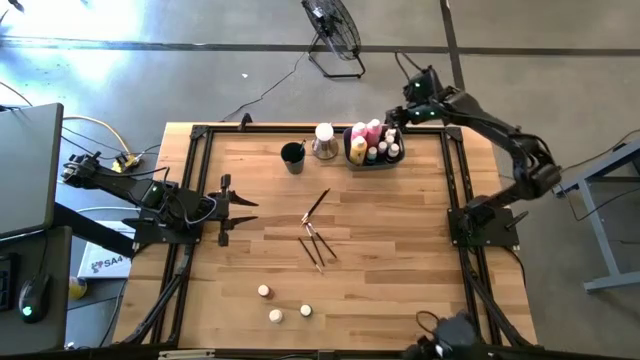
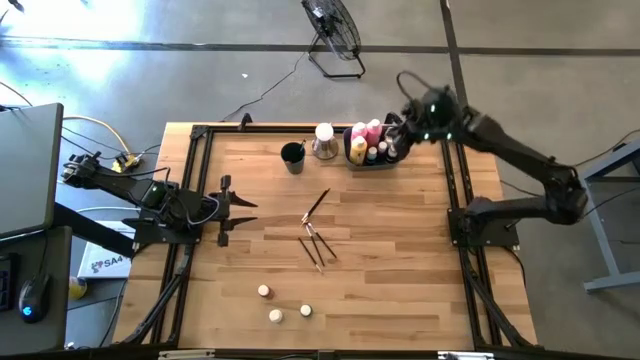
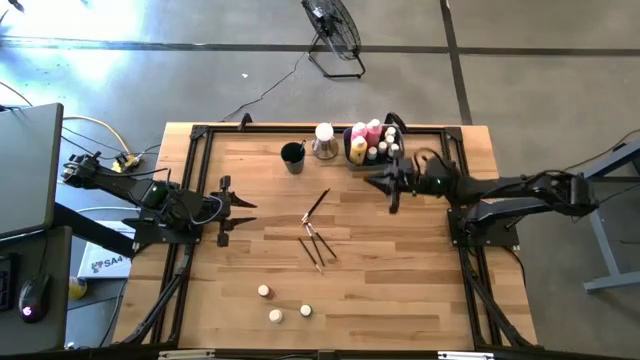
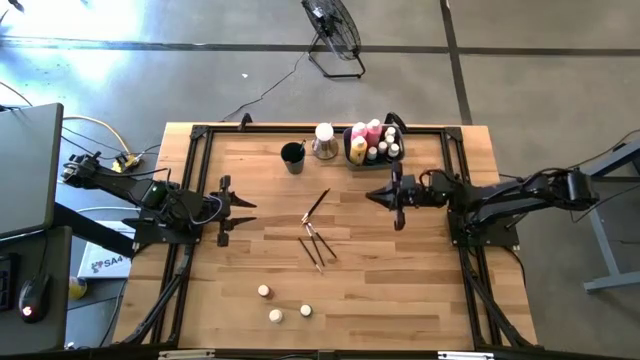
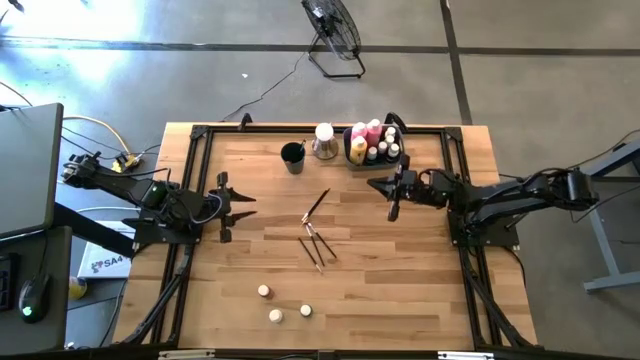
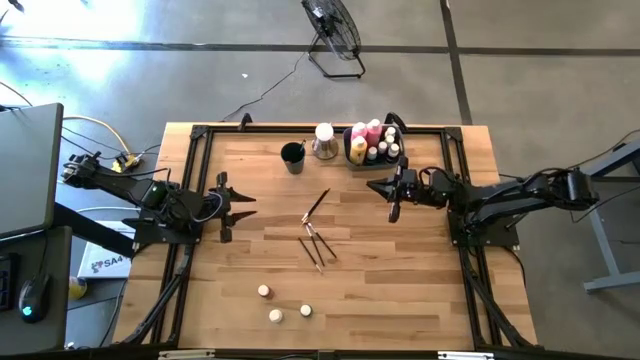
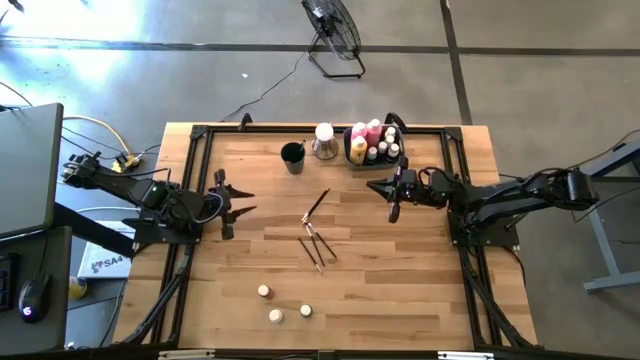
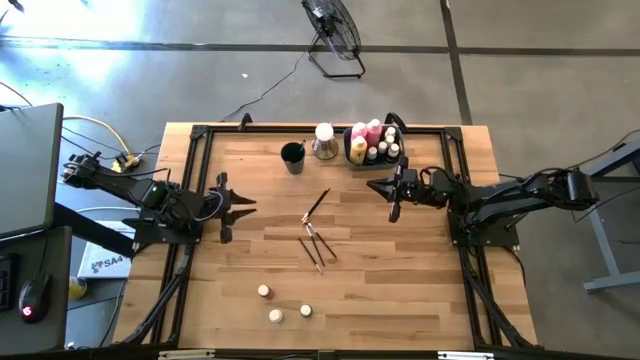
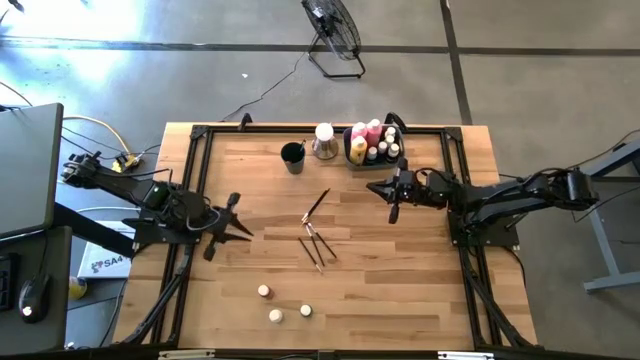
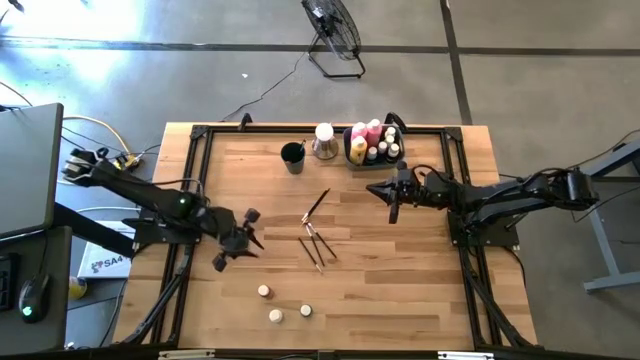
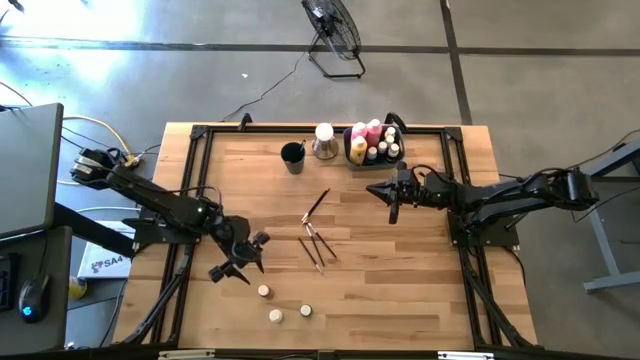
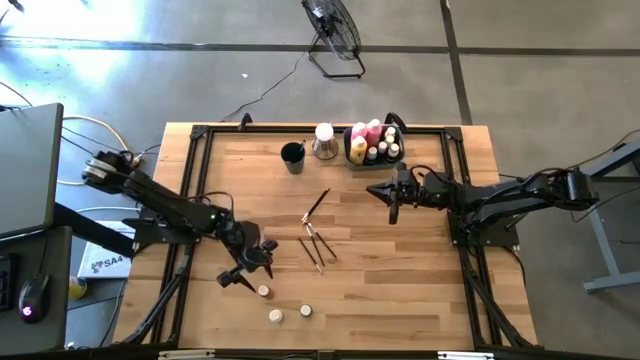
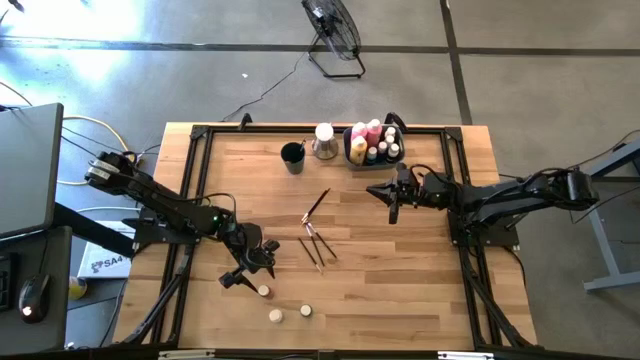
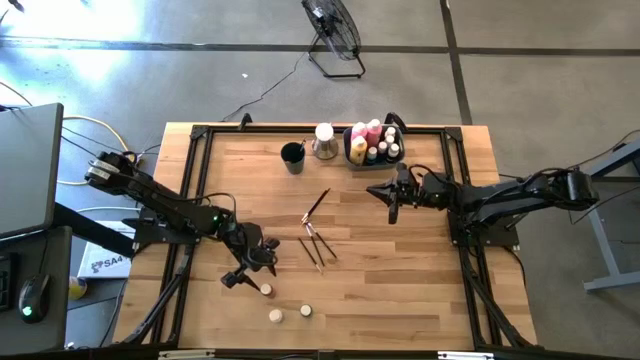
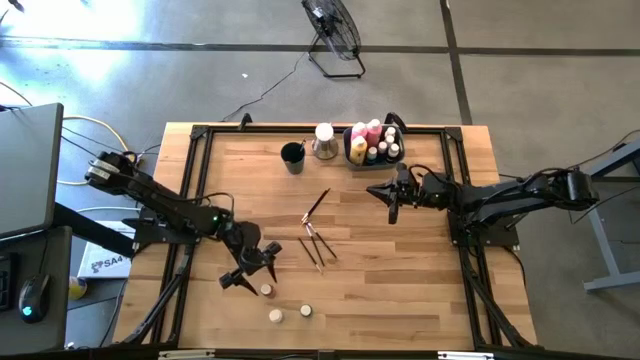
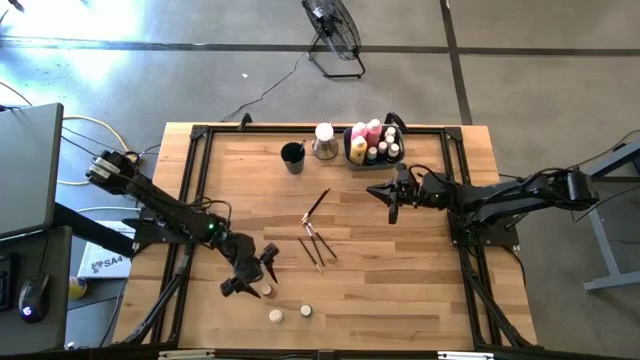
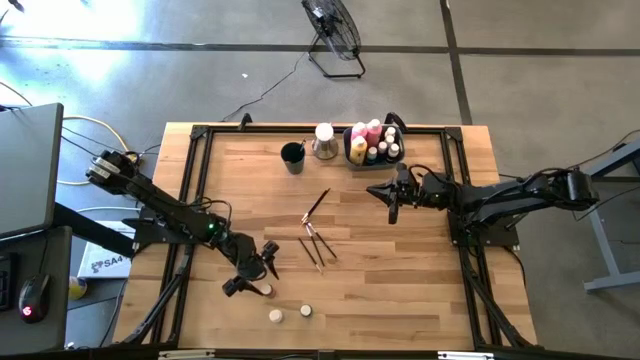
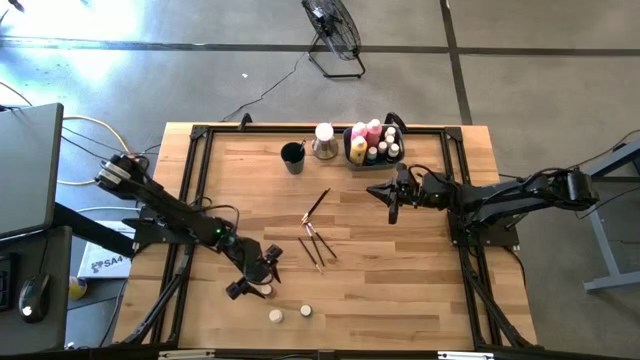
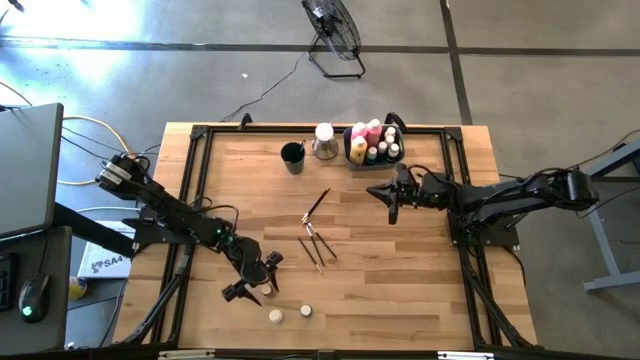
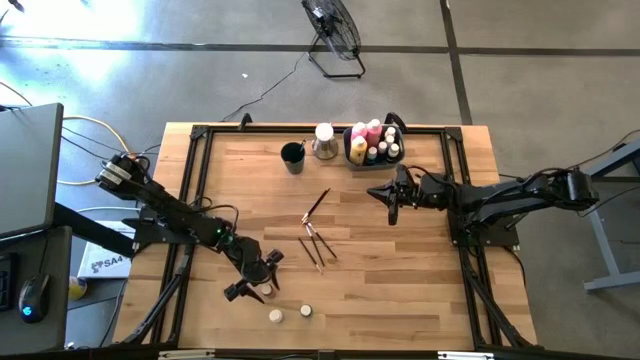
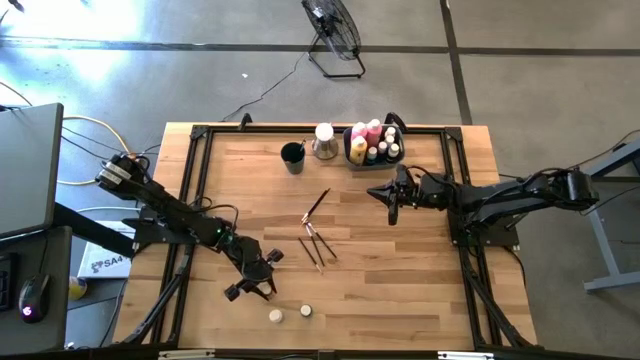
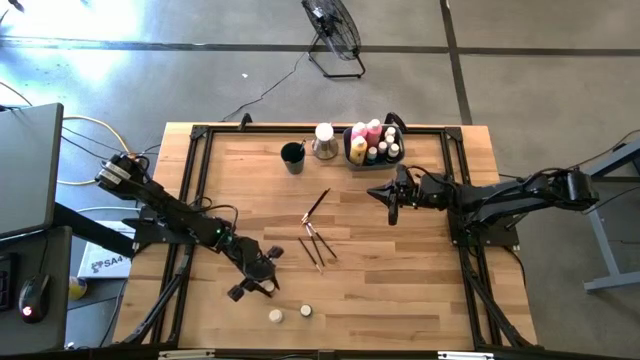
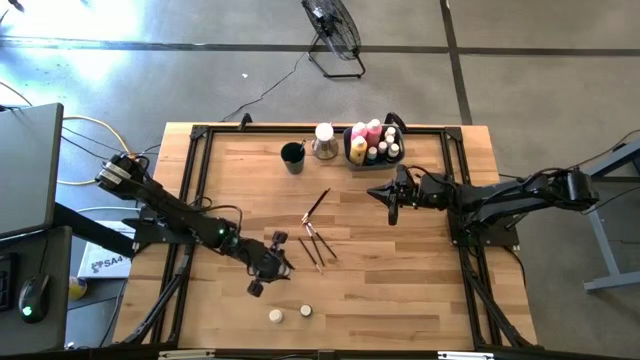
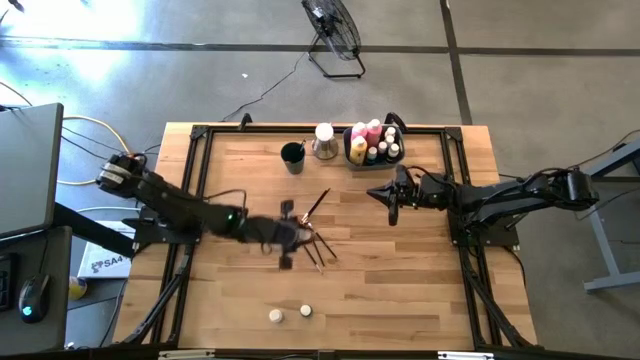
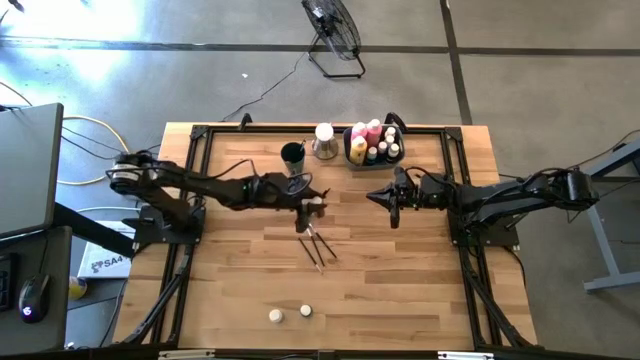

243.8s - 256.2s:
Task: Pick & Place Paint Supplies
Put the small red paint bottle into the blue bin

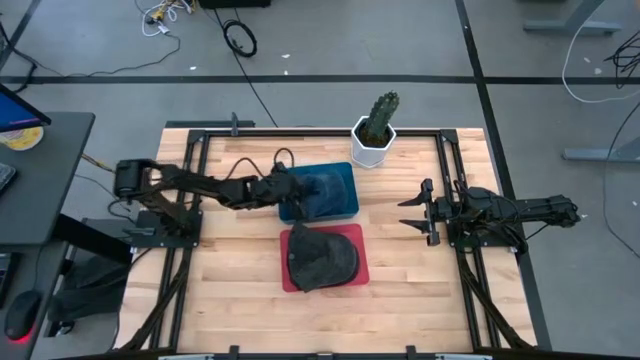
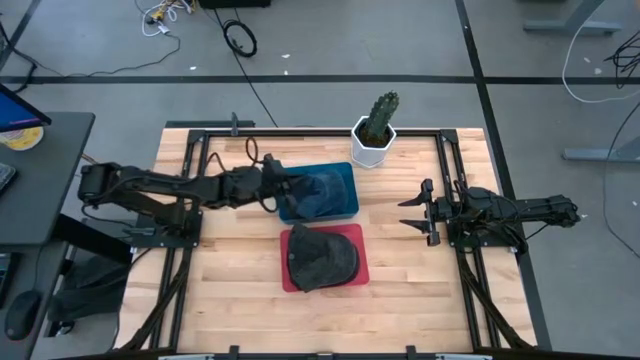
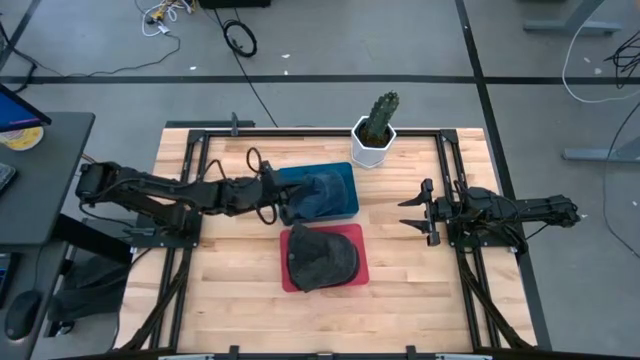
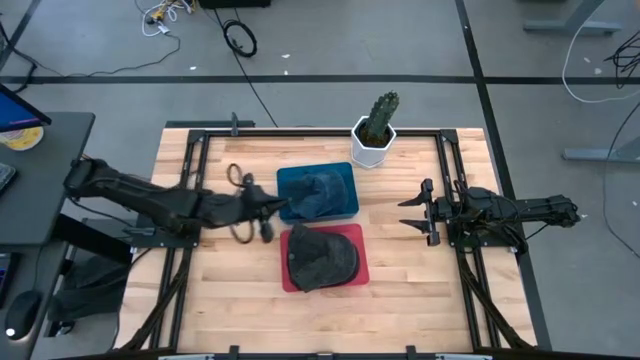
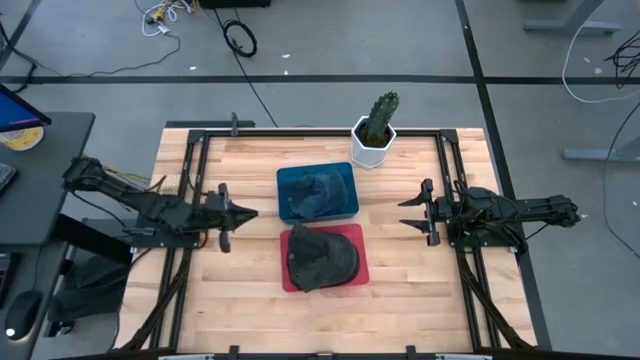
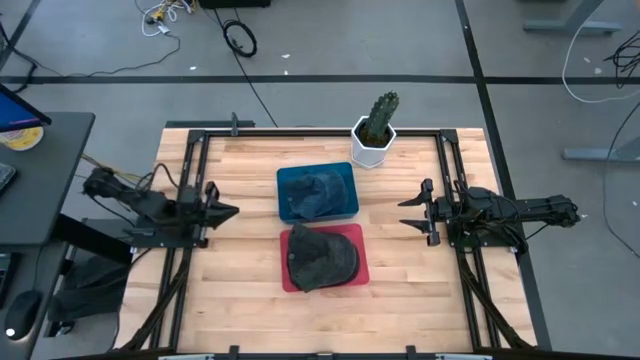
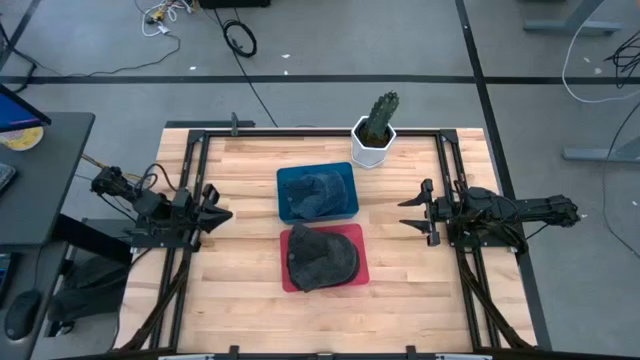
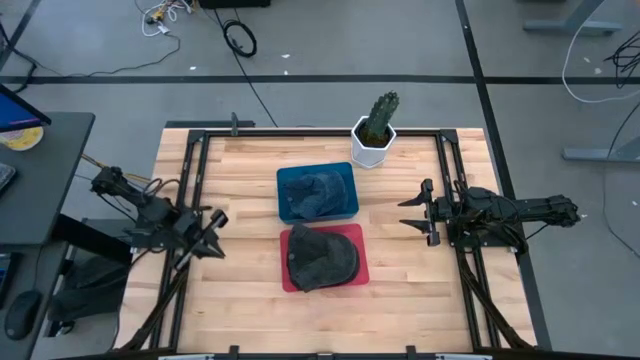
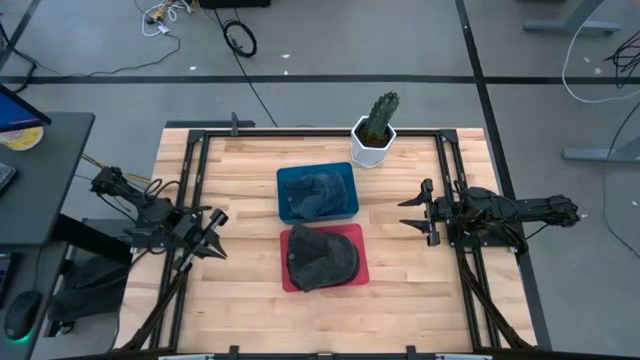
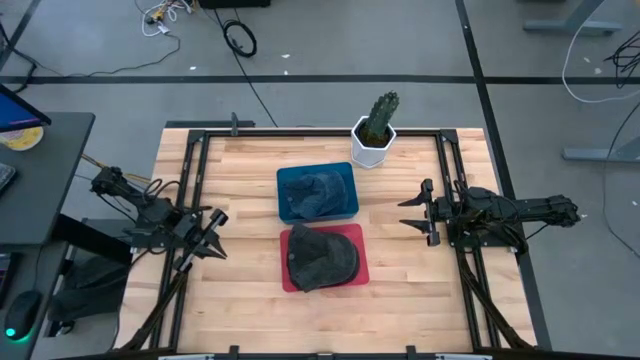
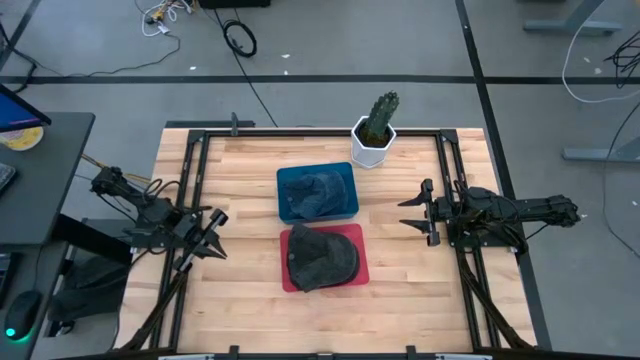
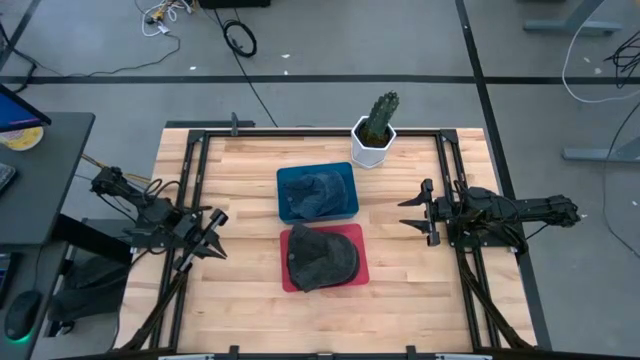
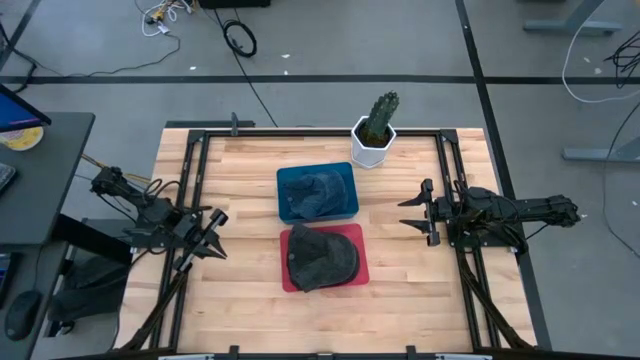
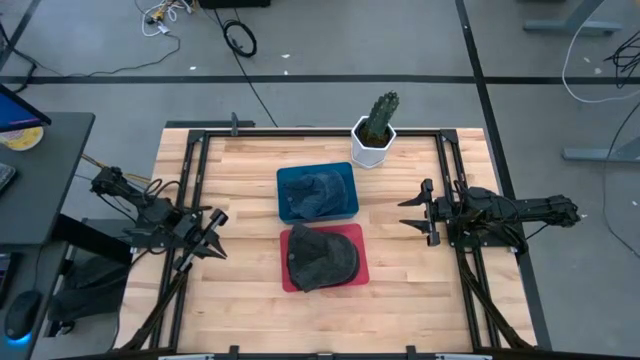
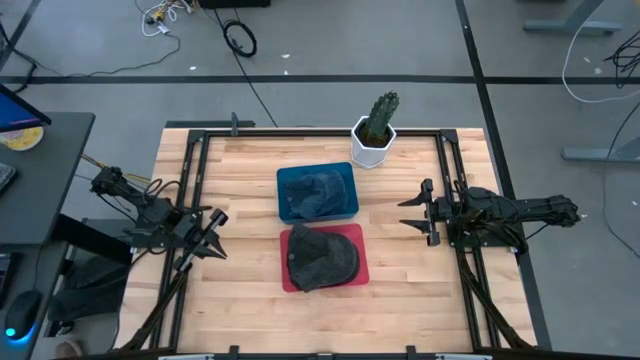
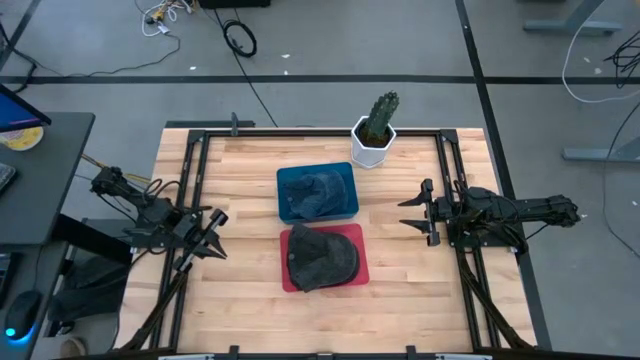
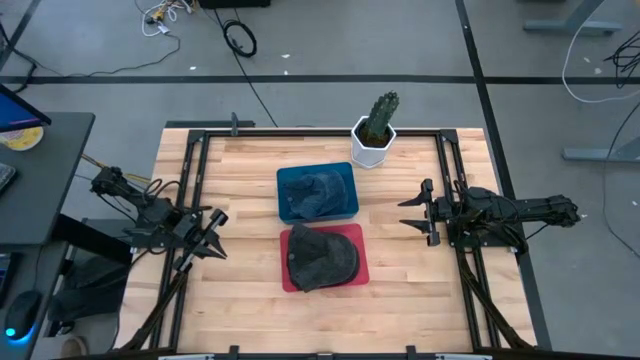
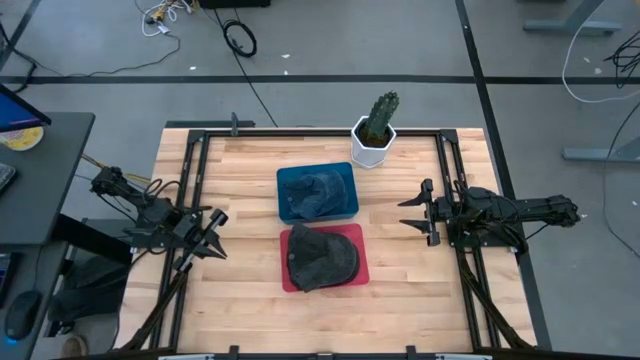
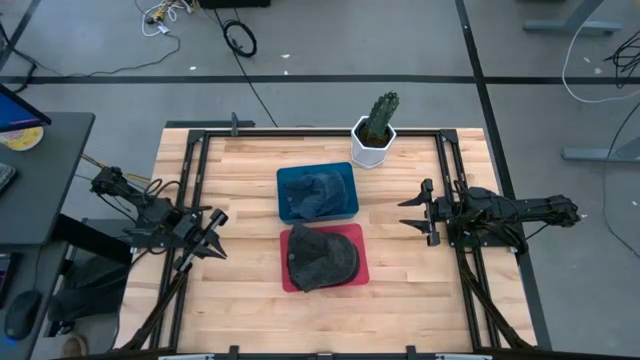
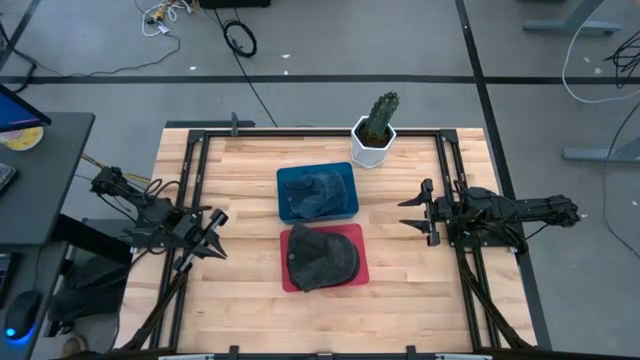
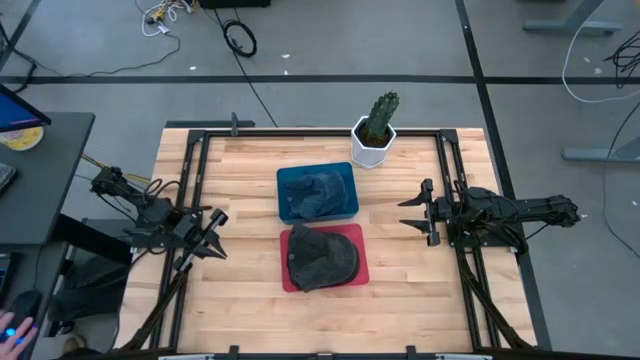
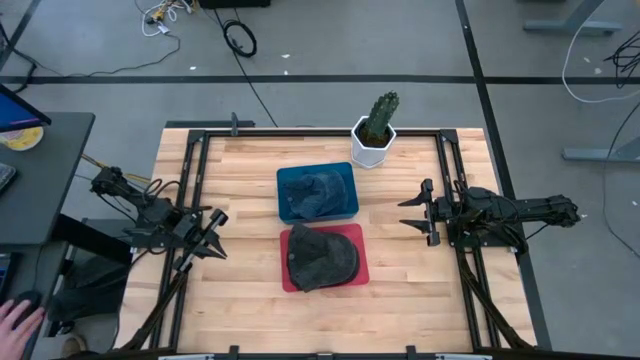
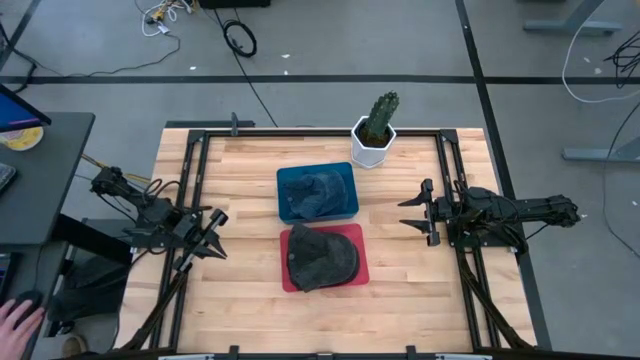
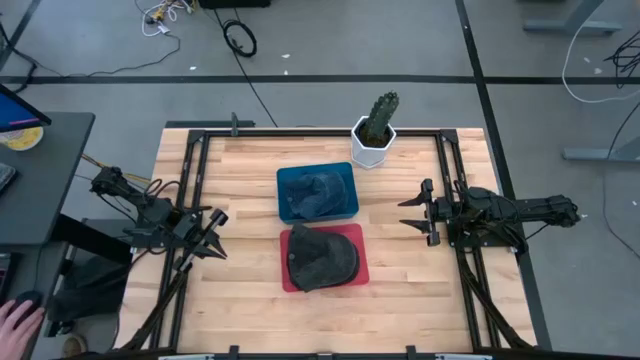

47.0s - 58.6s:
Task: Pick & Place hat
Return to Home Position
